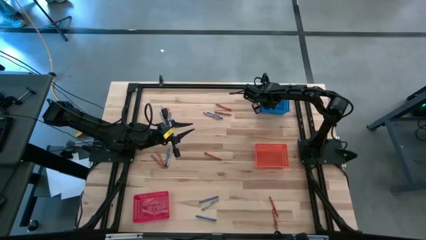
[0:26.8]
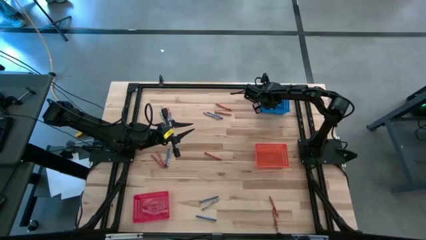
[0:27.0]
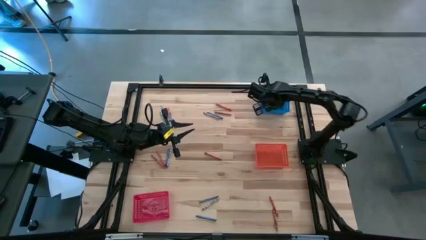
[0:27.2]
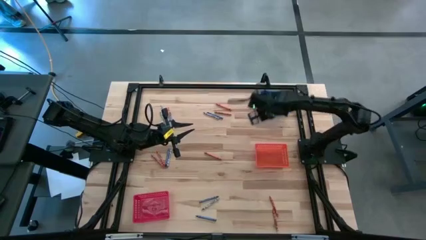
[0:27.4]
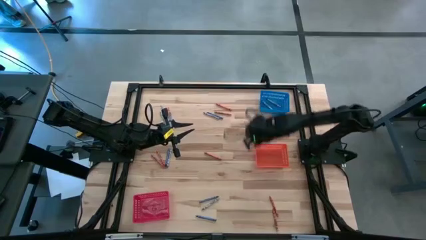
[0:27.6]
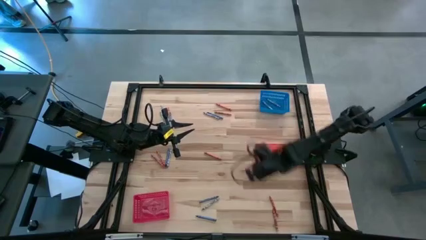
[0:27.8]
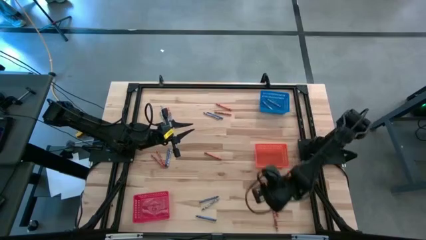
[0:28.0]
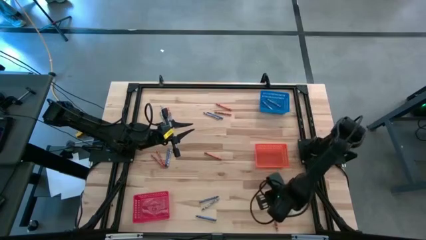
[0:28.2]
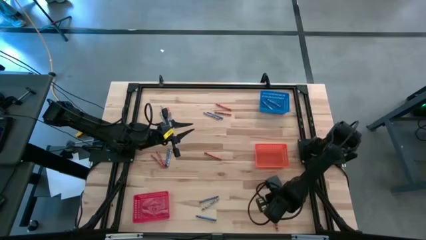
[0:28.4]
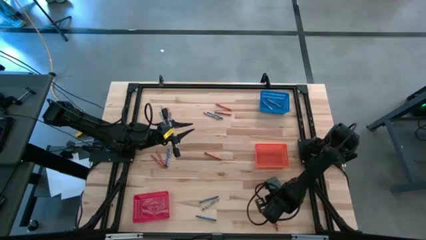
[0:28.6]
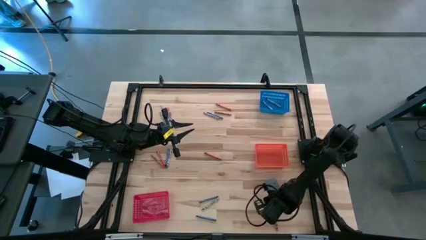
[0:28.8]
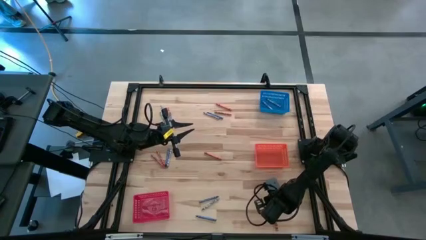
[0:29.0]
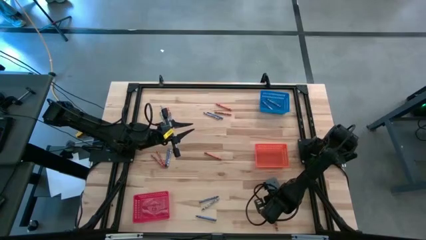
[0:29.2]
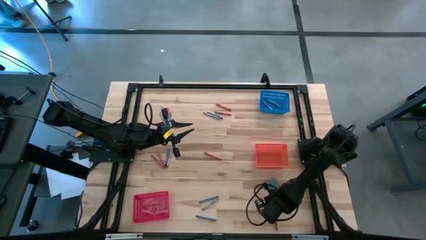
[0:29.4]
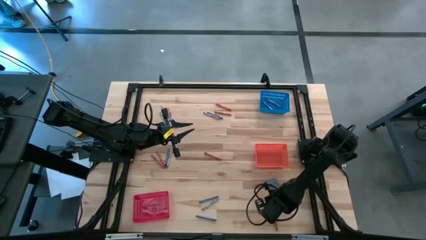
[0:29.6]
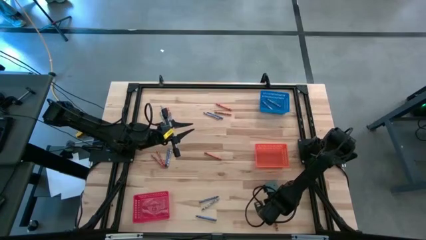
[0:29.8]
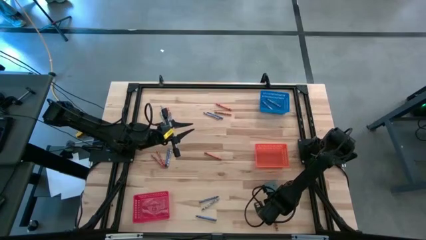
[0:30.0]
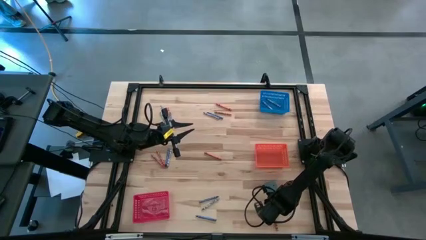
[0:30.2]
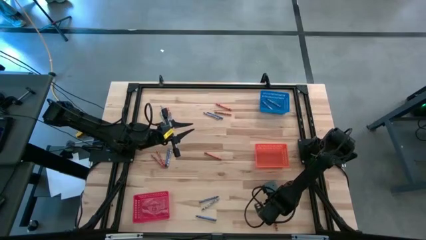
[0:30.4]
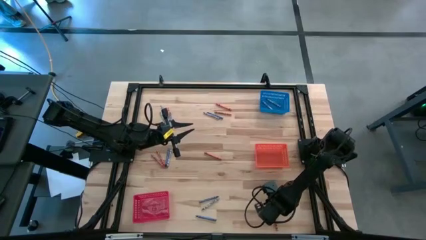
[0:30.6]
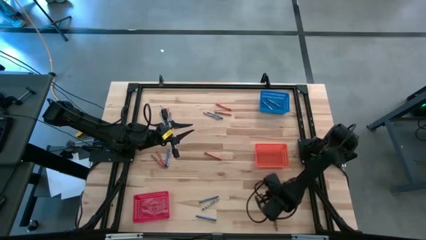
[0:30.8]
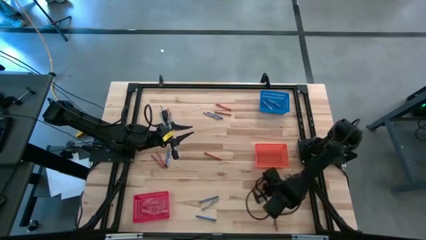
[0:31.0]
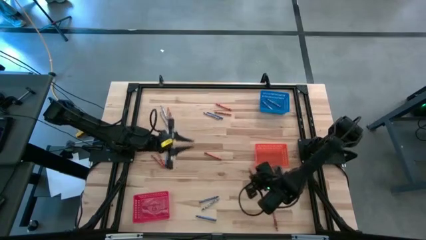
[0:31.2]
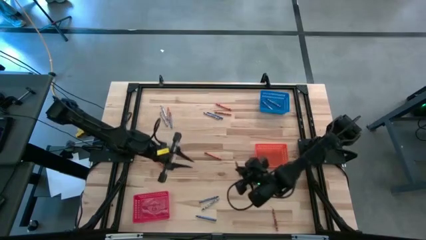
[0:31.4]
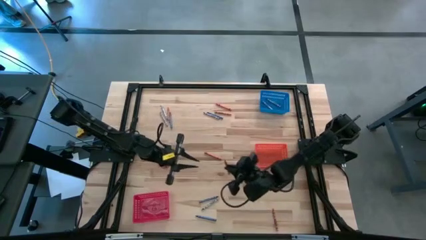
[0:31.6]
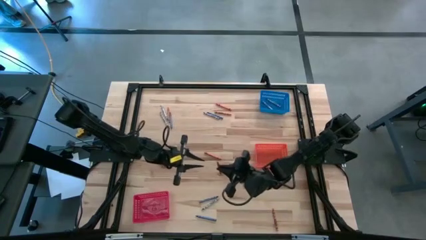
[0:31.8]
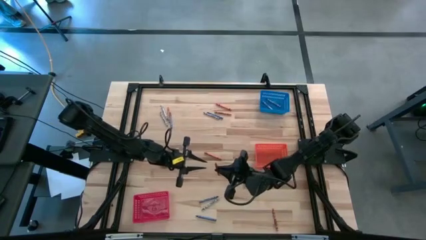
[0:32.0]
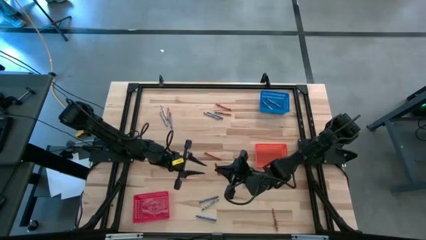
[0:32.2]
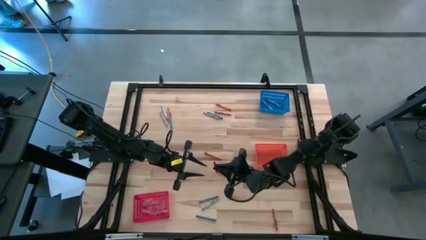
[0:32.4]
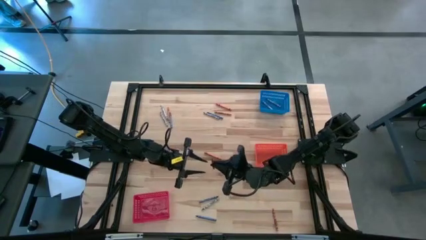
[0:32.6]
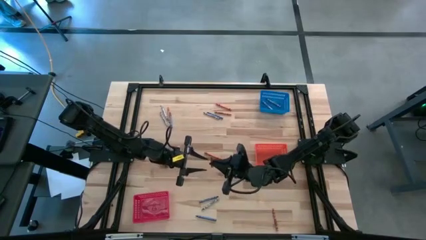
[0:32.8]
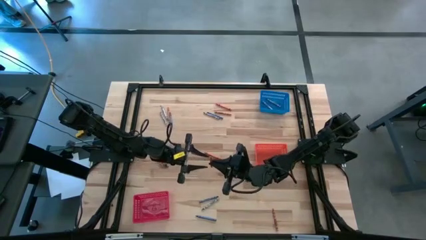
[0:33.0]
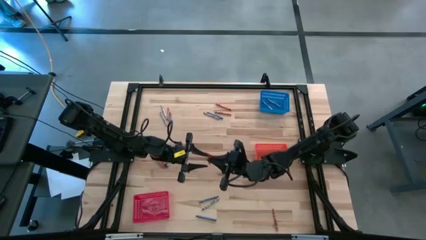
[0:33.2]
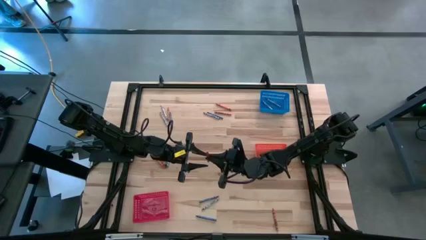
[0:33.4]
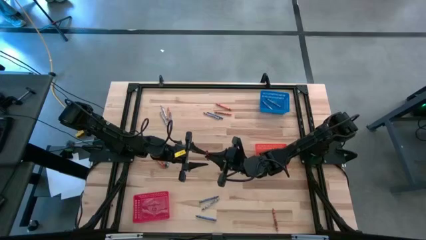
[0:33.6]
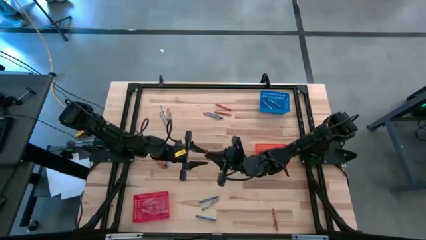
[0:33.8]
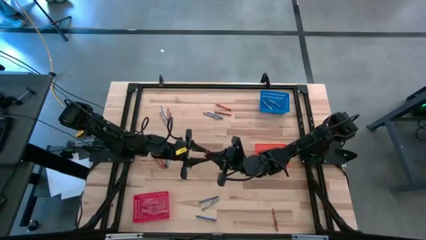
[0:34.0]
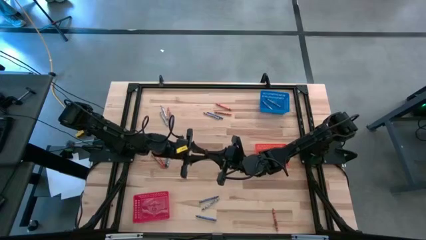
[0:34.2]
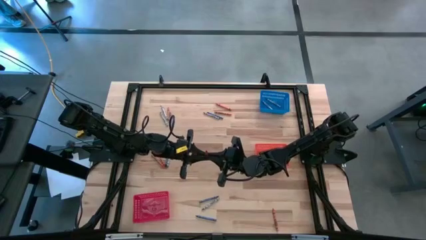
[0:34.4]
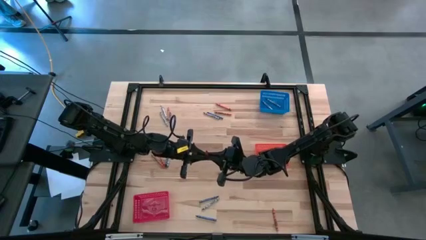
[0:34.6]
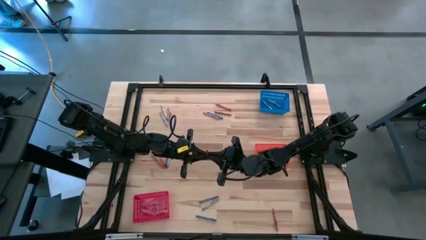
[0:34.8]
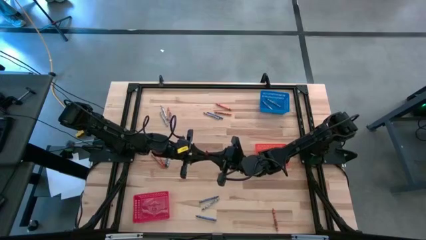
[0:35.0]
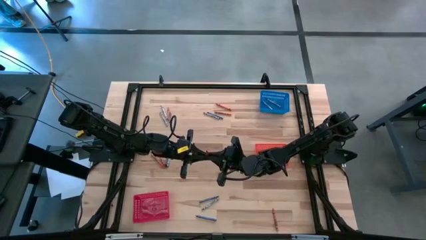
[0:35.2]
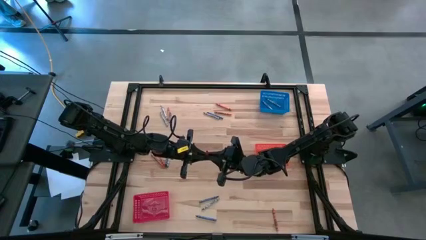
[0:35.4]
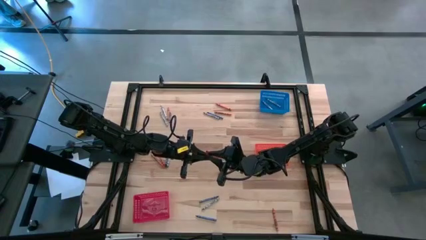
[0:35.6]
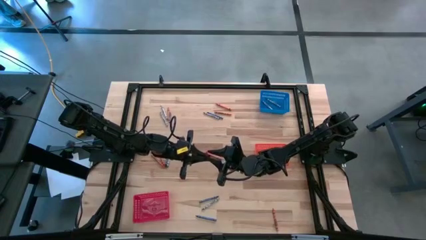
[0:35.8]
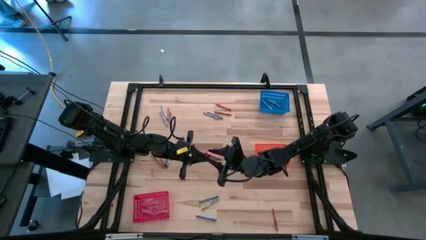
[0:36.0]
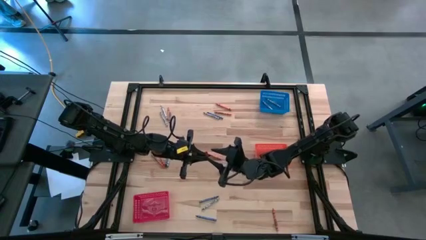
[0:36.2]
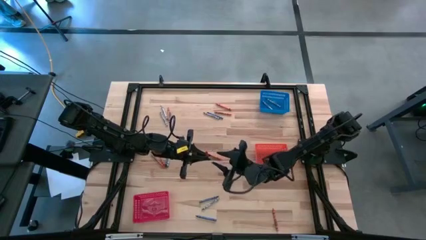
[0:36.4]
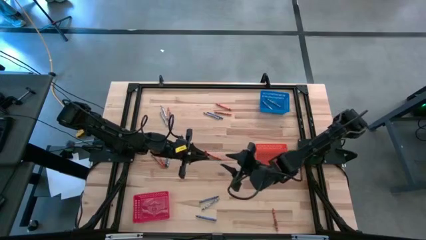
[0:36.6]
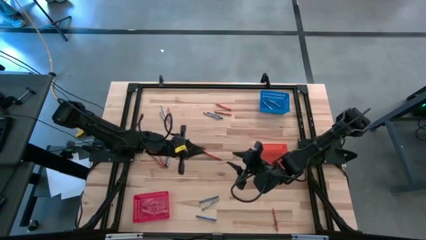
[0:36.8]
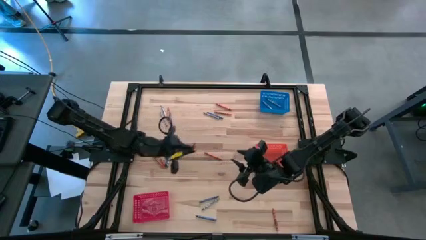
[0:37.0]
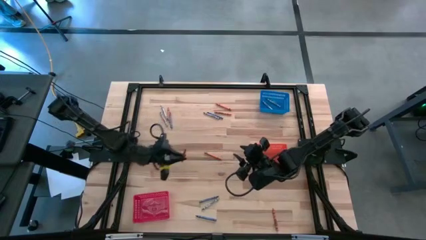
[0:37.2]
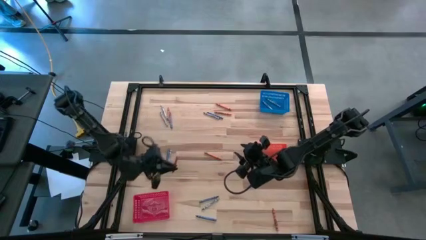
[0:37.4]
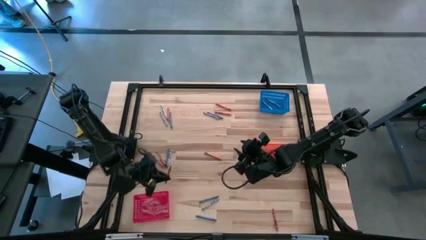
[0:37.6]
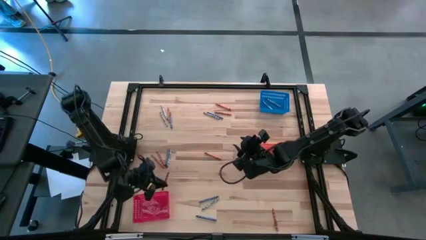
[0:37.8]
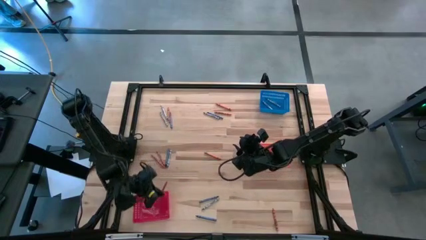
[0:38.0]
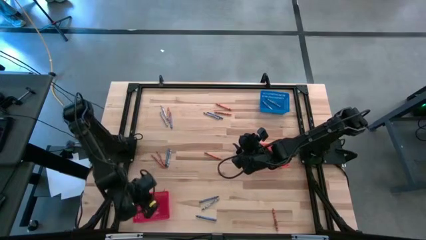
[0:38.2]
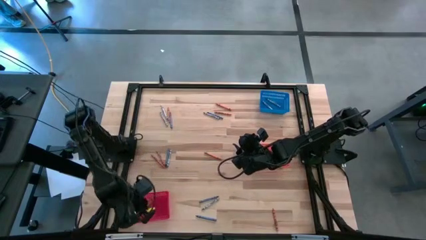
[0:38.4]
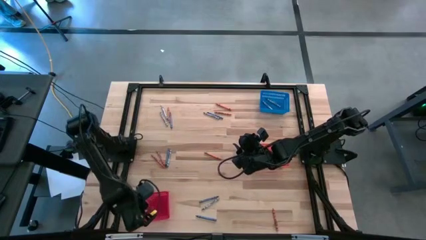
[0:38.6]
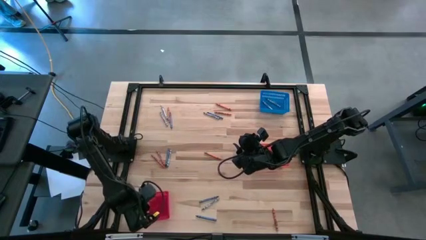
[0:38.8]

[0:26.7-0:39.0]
Task: Sort crayons
Put the orange crayon into the red bin
